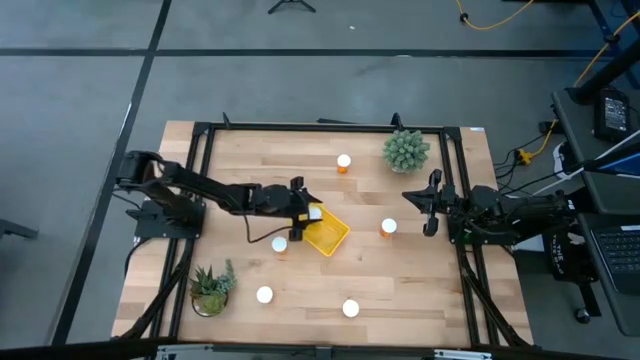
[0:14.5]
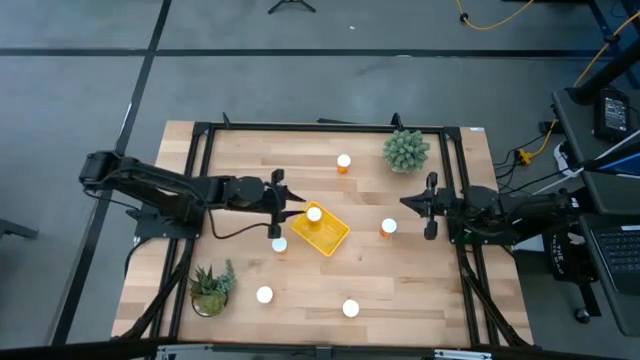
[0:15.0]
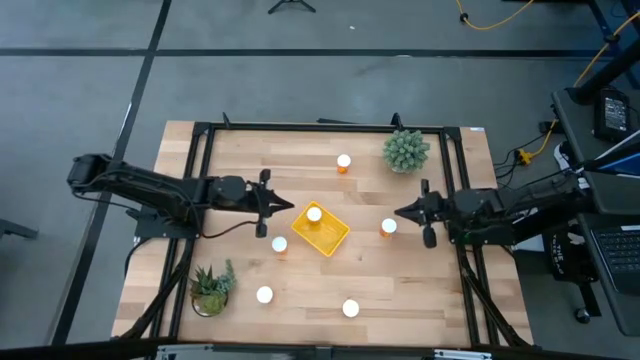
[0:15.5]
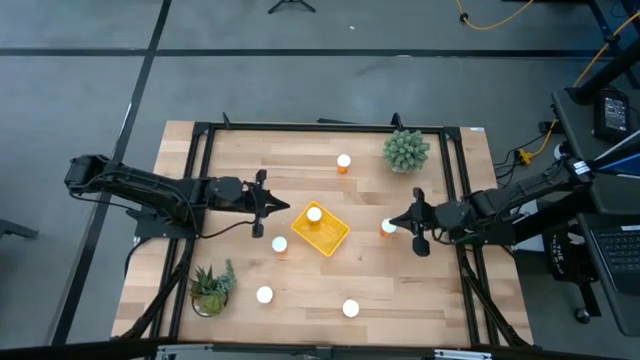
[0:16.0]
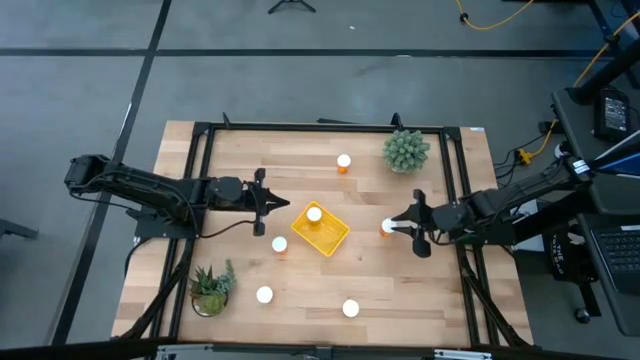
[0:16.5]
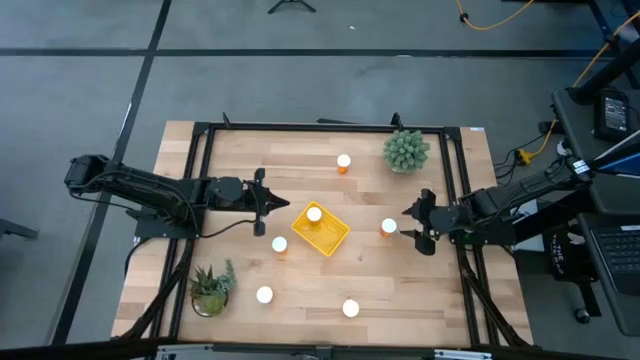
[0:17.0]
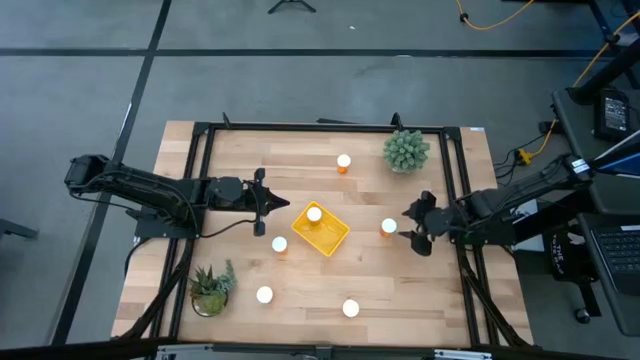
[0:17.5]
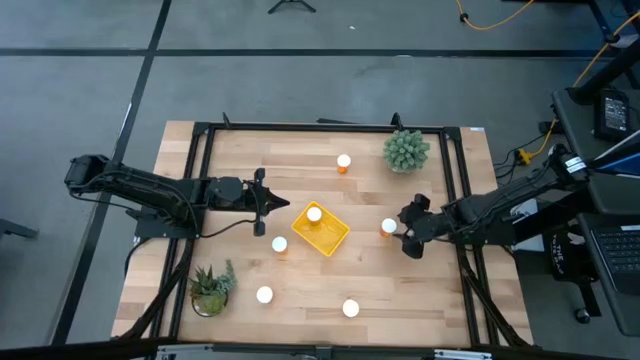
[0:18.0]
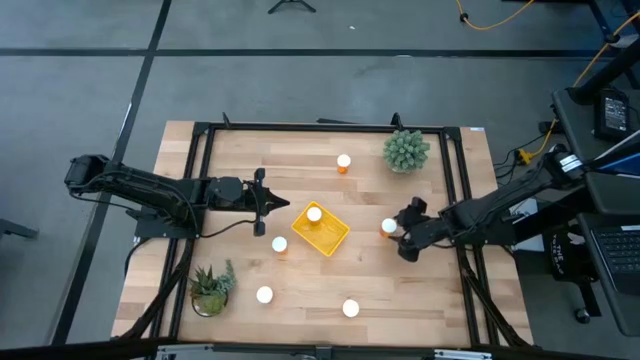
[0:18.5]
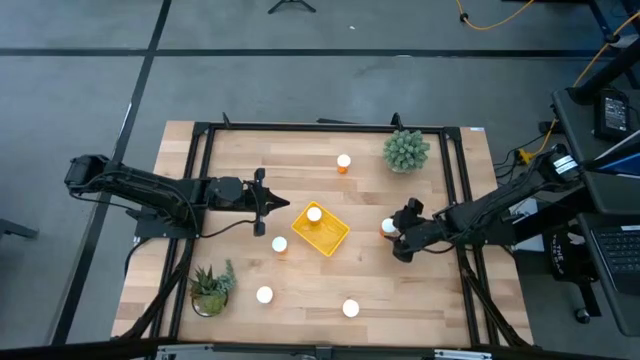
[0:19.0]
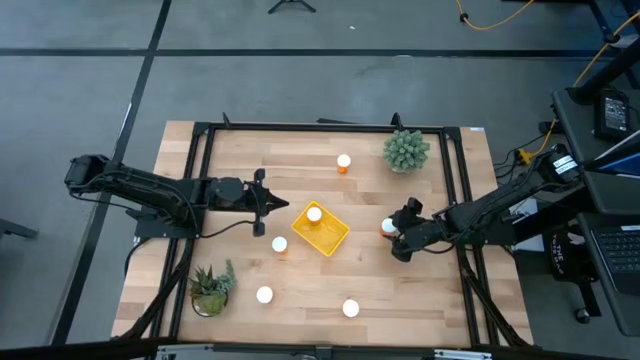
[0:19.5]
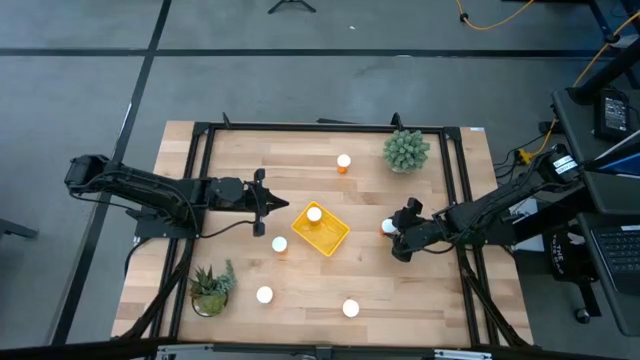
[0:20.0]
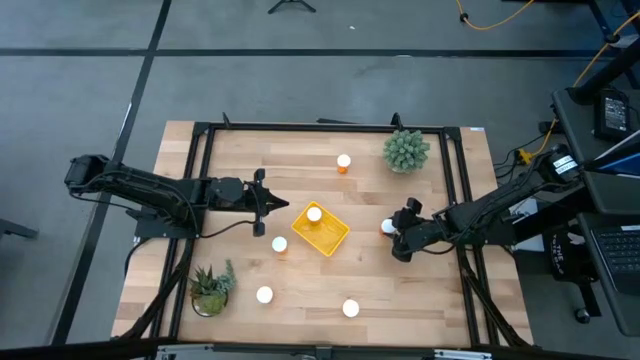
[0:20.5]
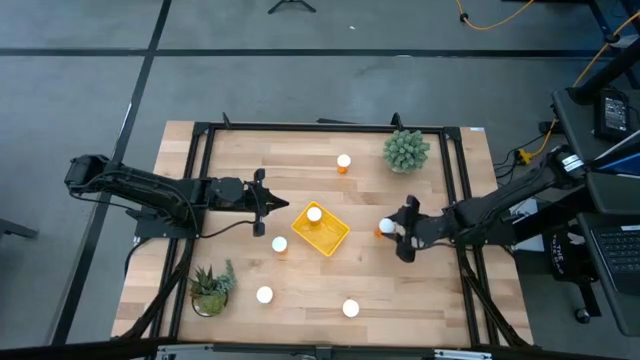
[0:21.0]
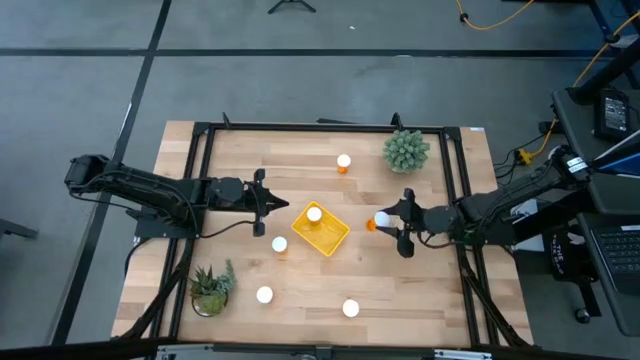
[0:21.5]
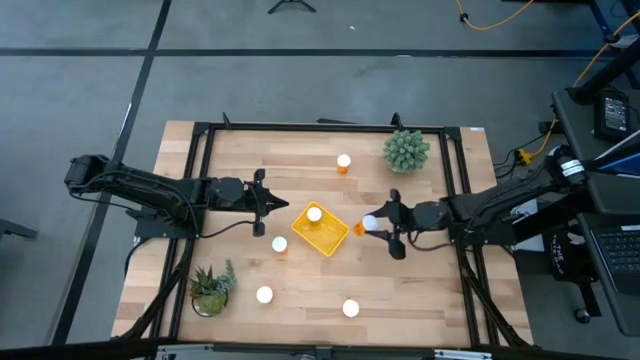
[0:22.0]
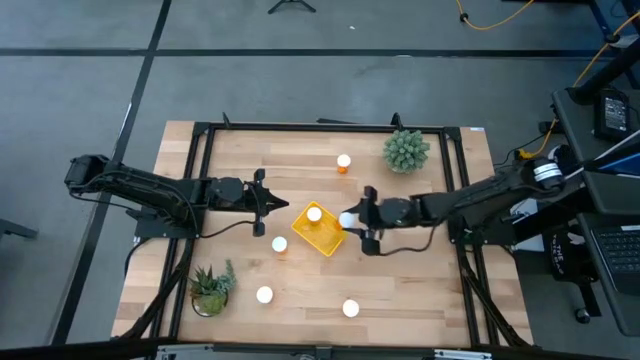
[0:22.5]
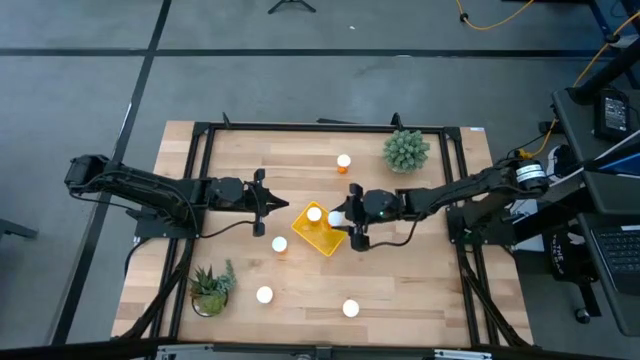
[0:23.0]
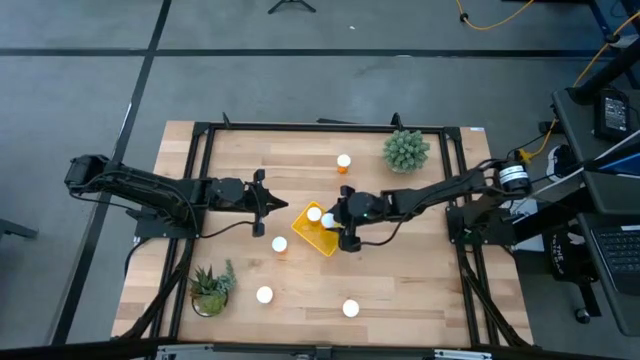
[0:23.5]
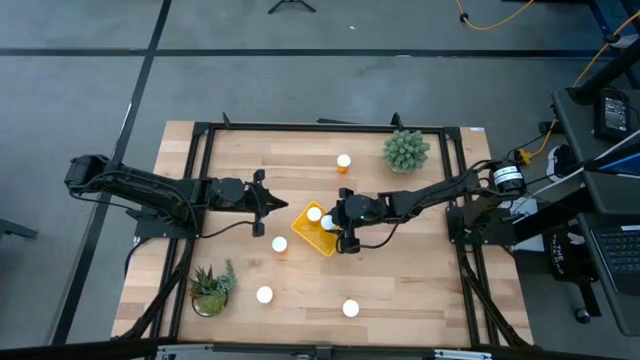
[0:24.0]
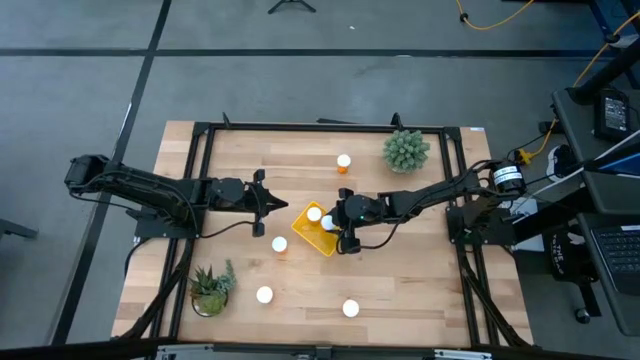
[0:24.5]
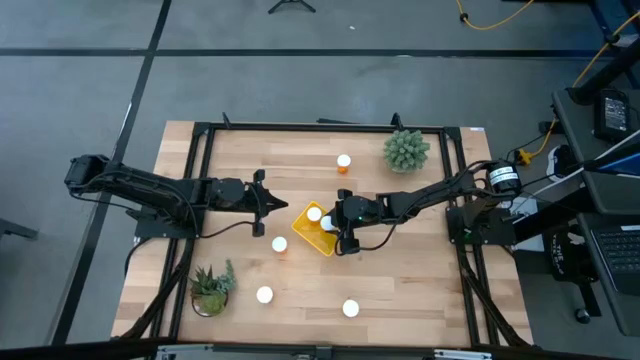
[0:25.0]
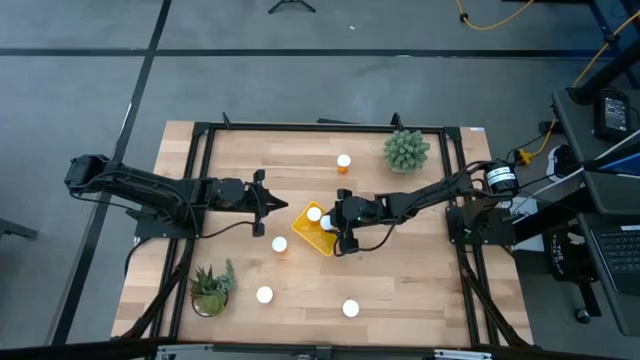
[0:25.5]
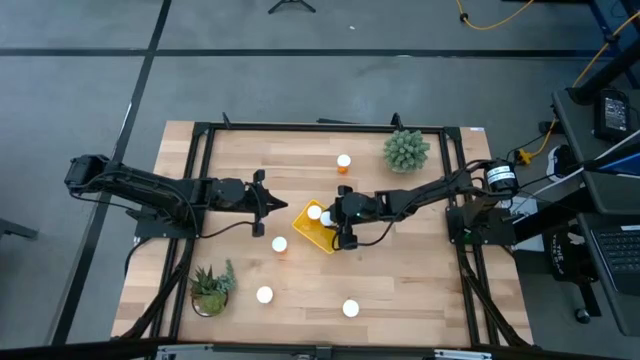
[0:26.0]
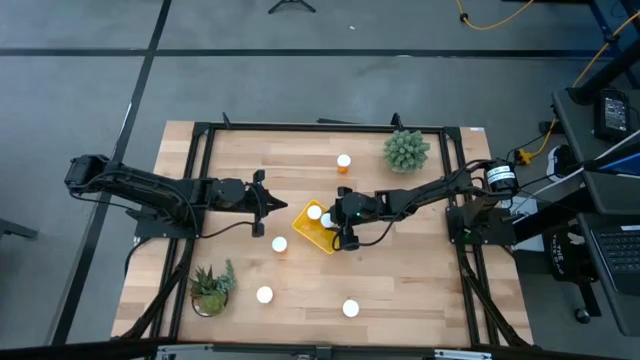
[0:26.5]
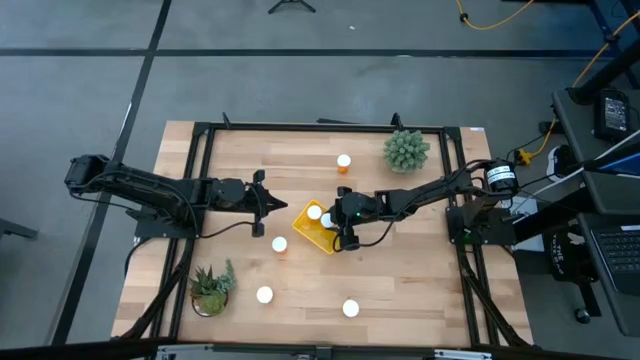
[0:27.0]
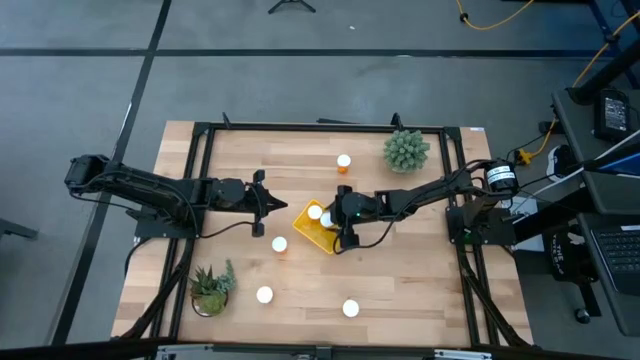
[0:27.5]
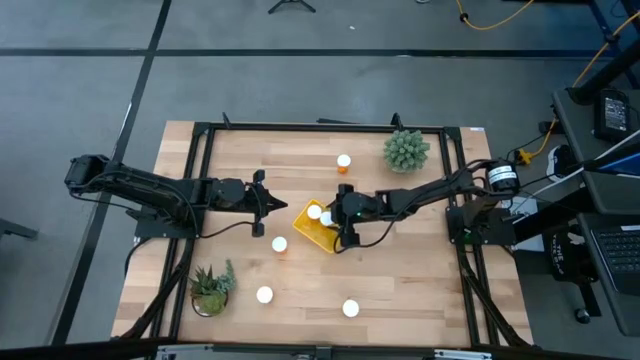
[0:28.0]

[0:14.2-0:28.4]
Task: Pick and place pill bottles into a basket
Put the orange pill bottle into the yellow bin

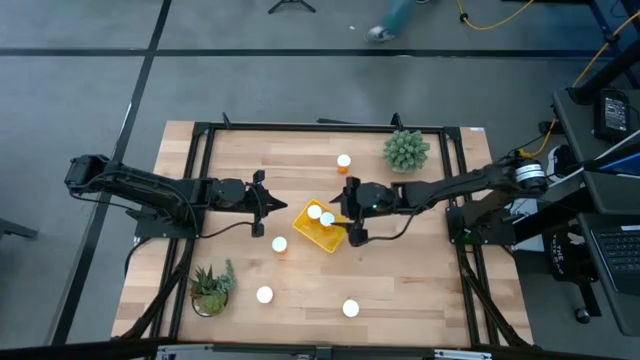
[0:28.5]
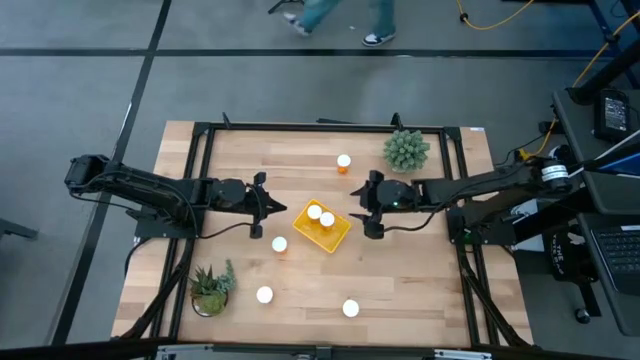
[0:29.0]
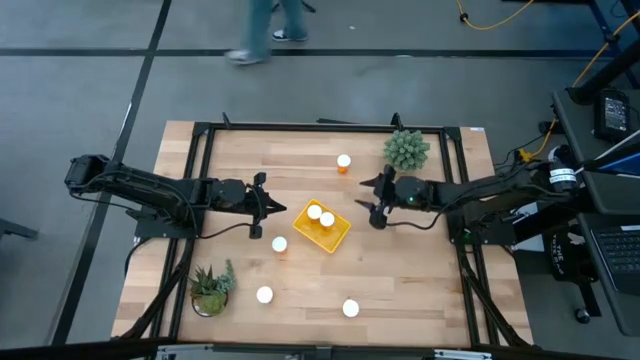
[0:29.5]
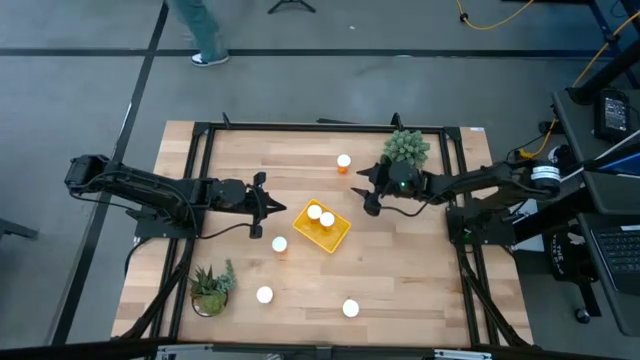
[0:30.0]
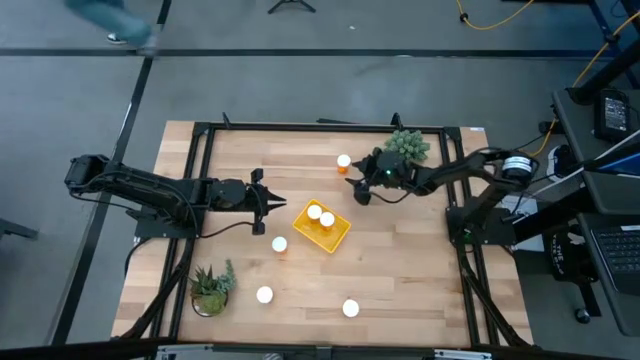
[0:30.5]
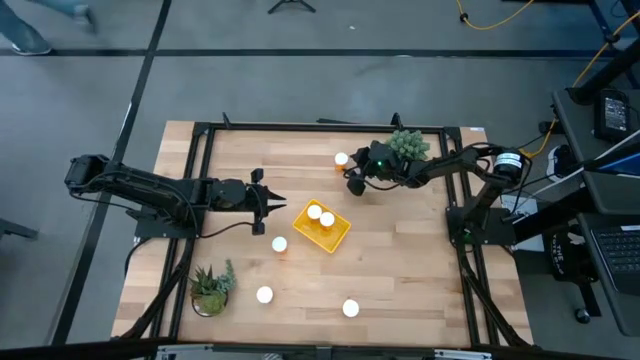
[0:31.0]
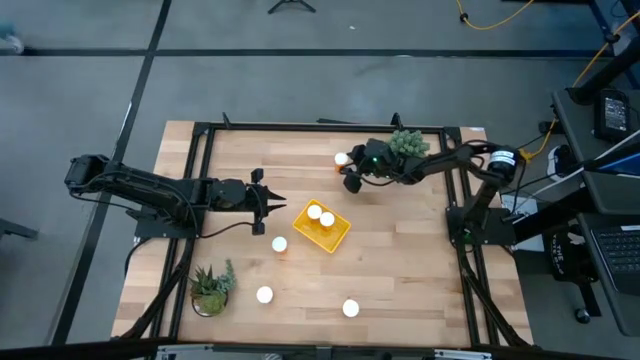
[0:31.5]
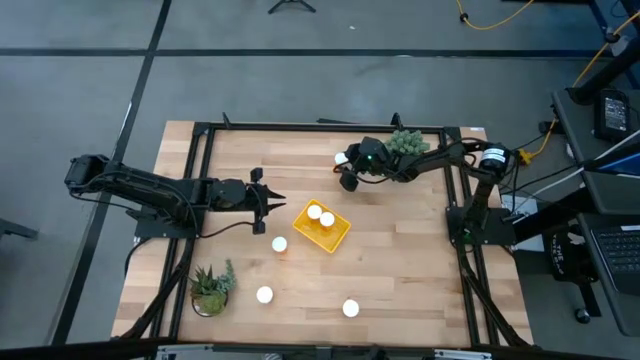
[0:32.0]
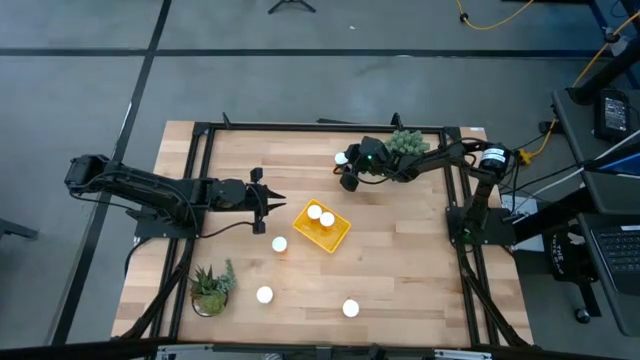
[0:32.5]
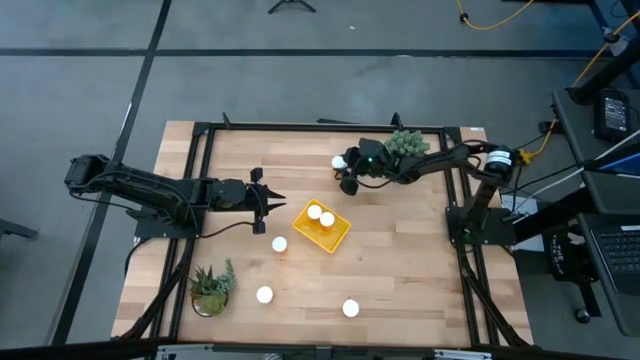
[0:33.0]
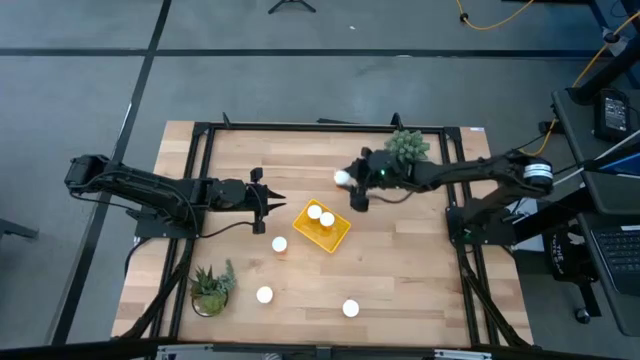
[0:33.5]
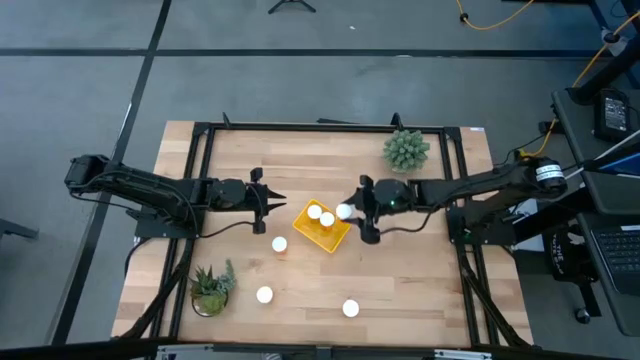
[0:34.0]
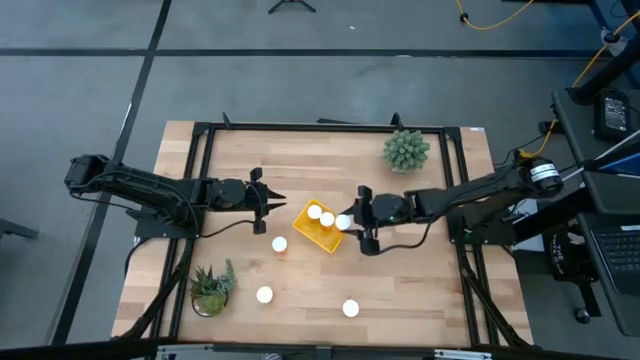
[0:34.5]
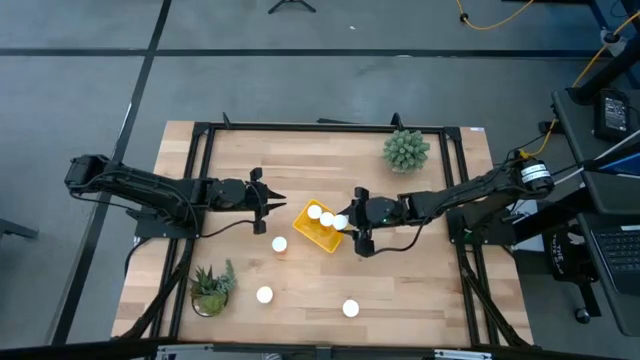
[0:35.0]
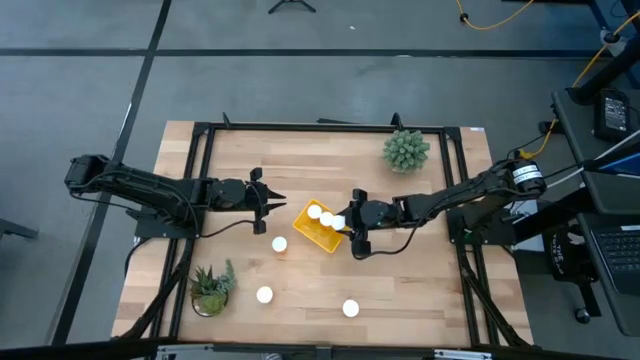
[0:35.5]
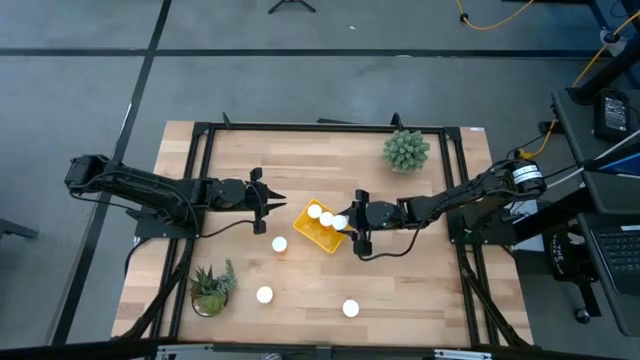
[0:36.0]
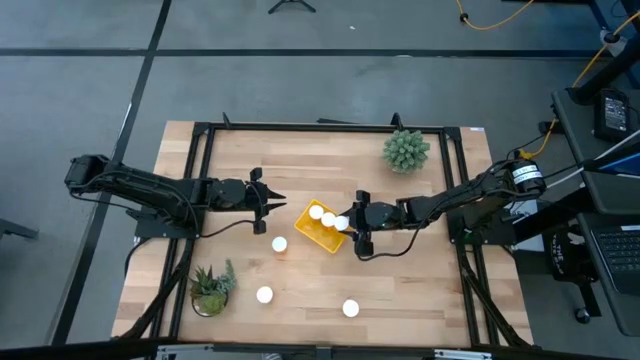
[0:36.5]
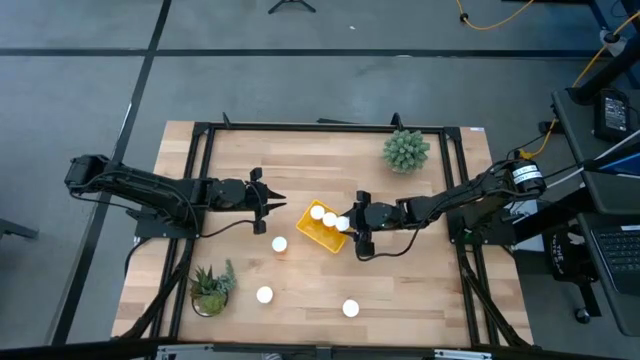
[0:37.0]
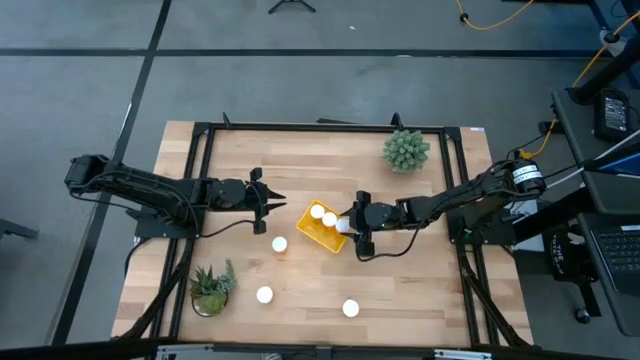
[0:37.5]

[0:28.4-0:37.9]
Put the orange pill bottle into the yellow bin
